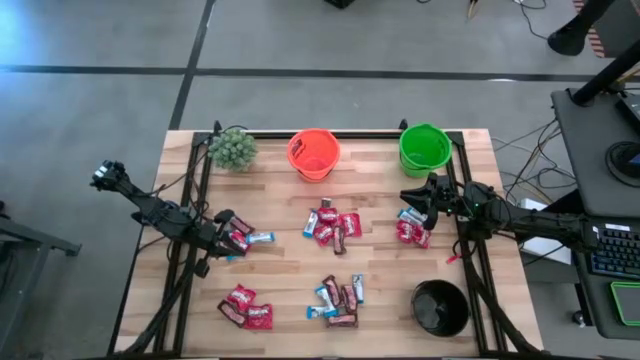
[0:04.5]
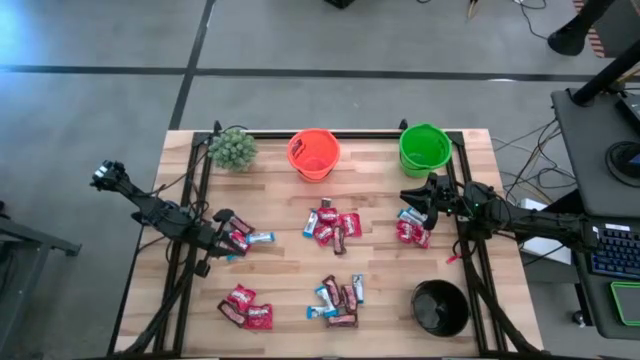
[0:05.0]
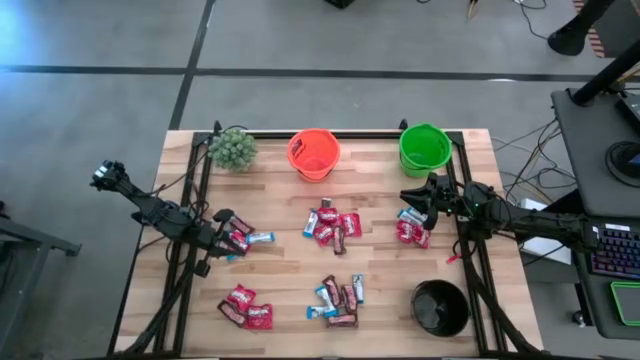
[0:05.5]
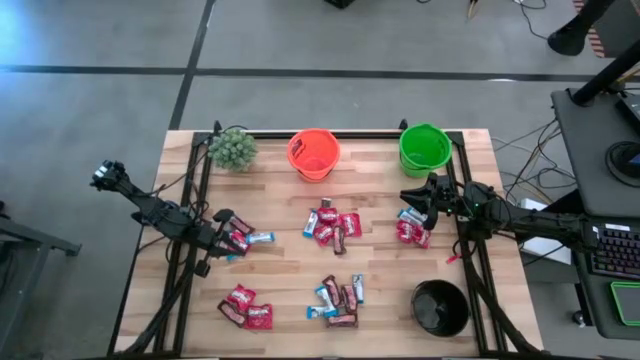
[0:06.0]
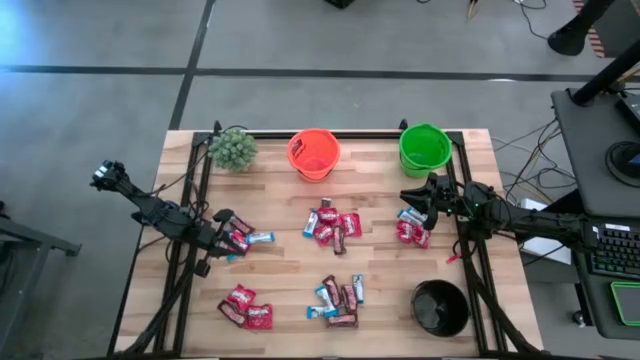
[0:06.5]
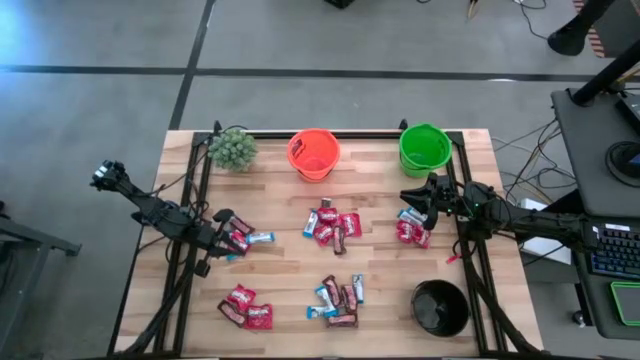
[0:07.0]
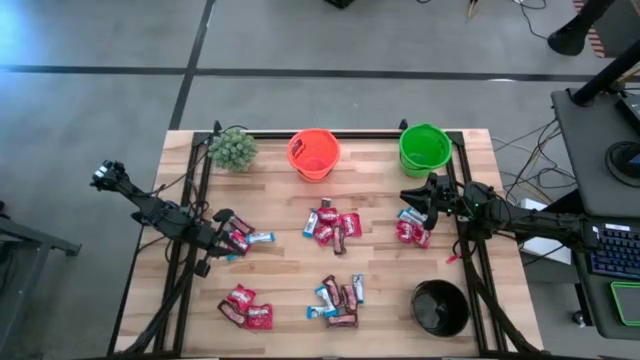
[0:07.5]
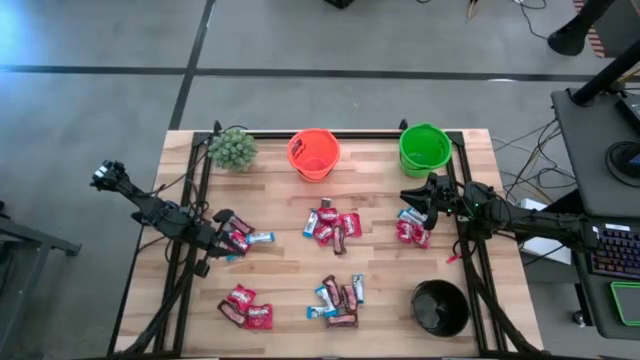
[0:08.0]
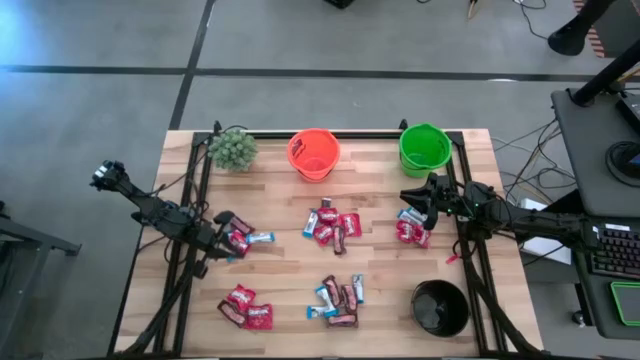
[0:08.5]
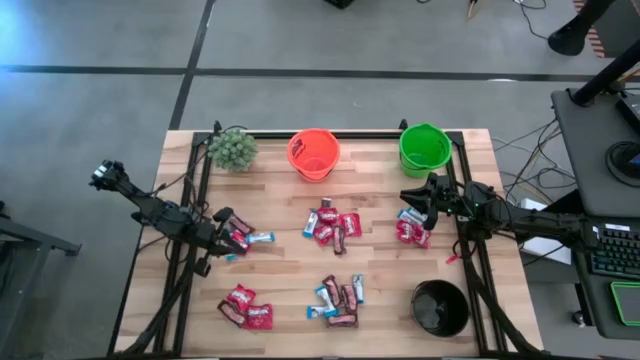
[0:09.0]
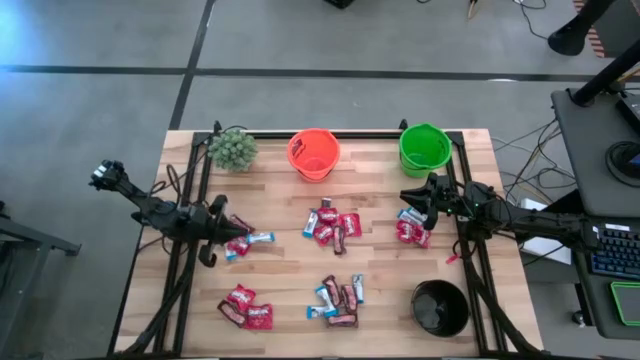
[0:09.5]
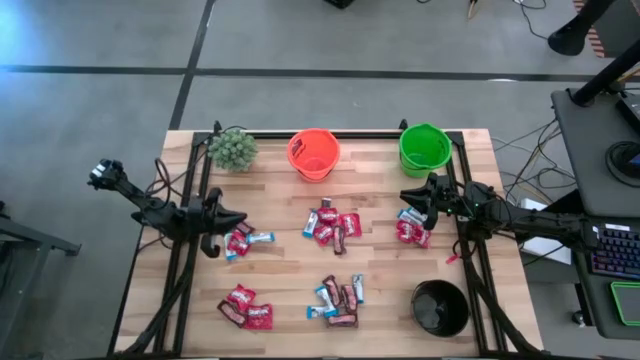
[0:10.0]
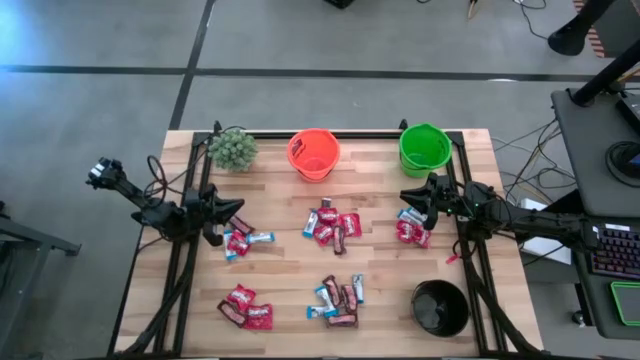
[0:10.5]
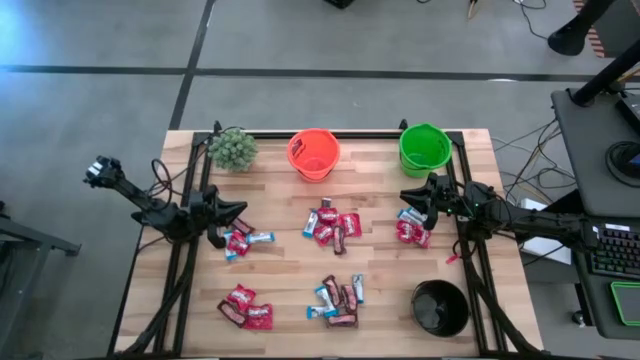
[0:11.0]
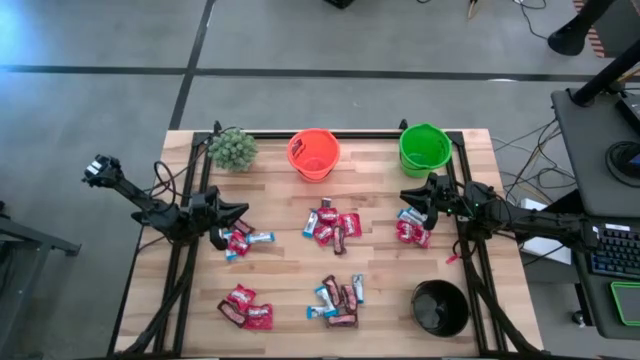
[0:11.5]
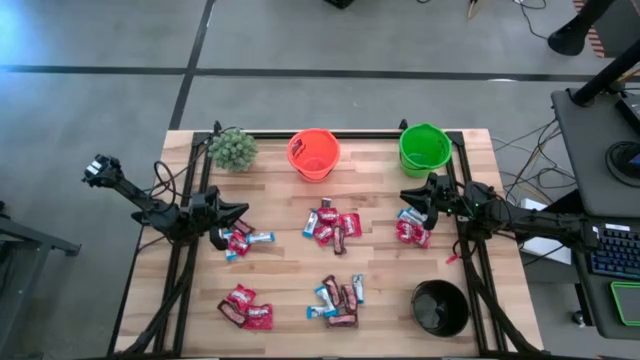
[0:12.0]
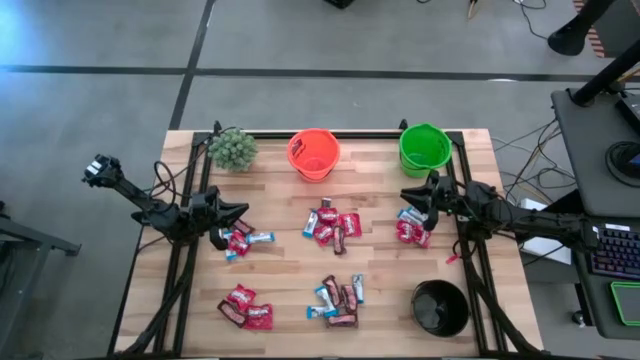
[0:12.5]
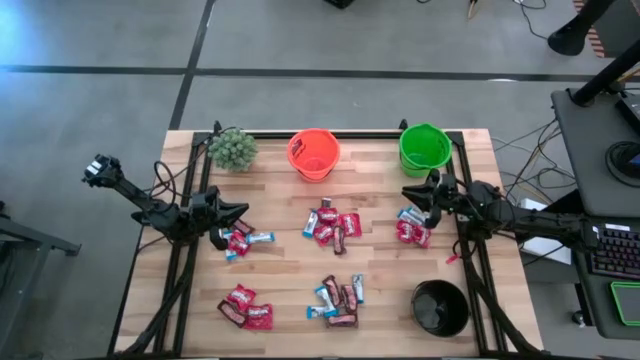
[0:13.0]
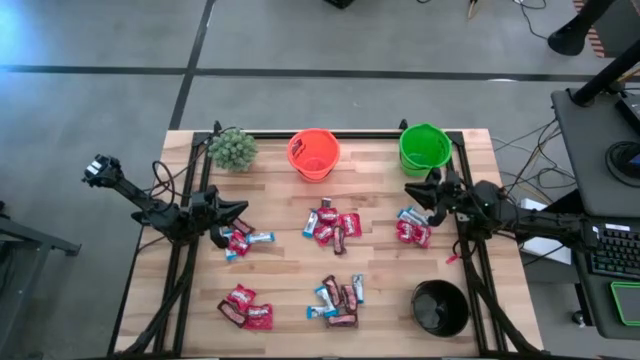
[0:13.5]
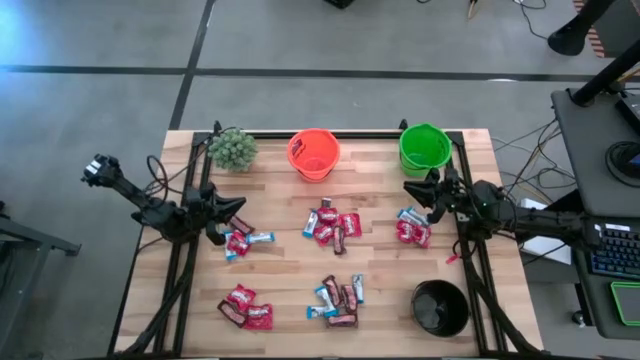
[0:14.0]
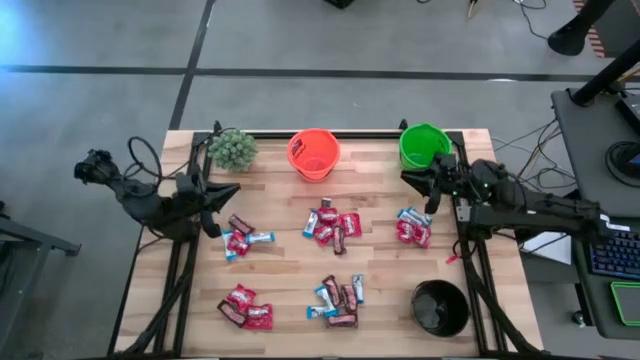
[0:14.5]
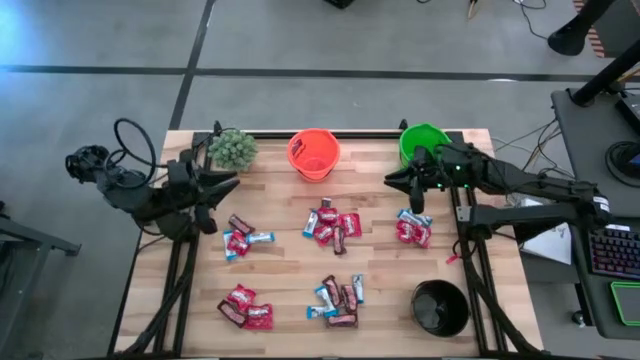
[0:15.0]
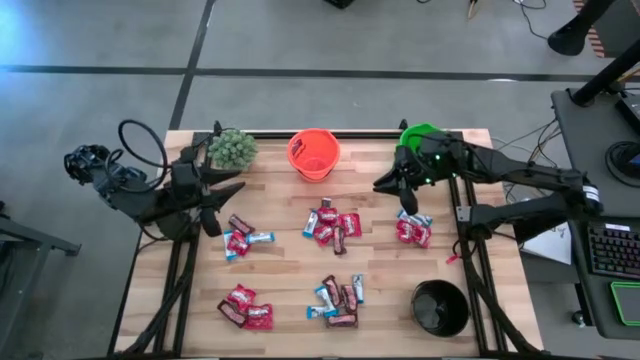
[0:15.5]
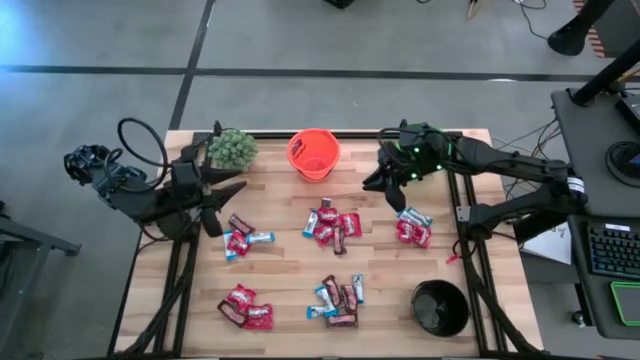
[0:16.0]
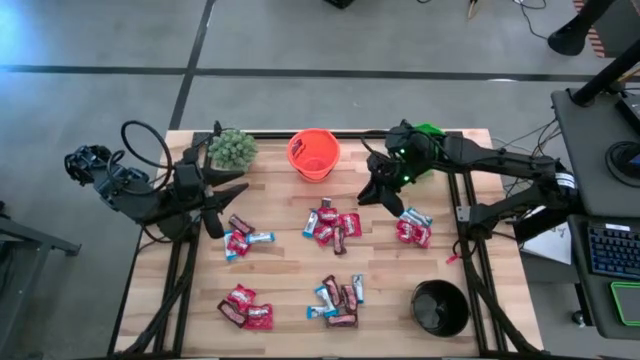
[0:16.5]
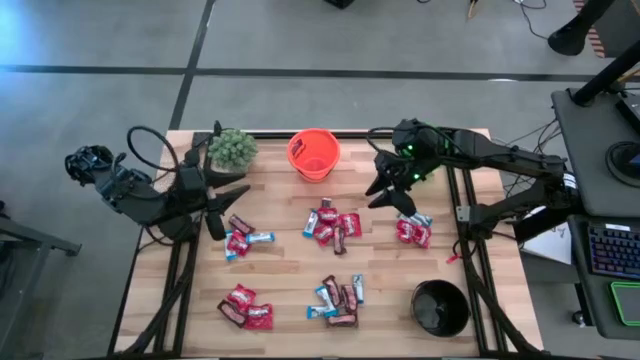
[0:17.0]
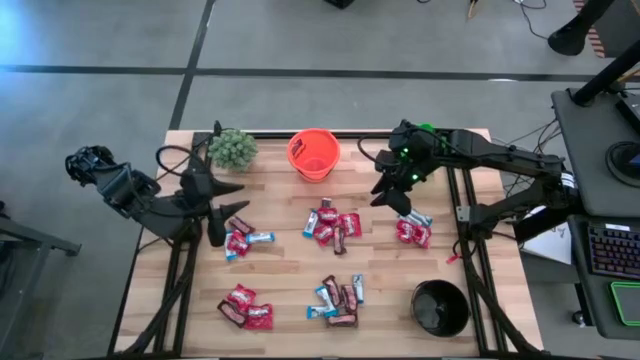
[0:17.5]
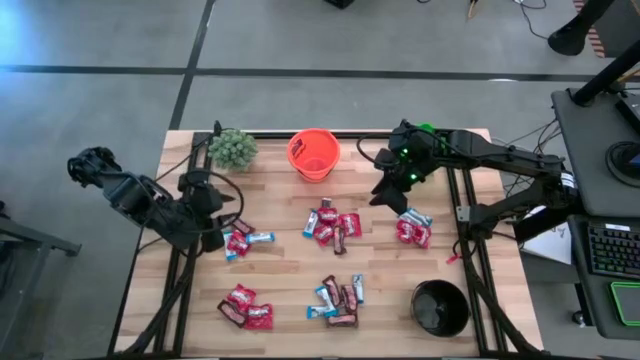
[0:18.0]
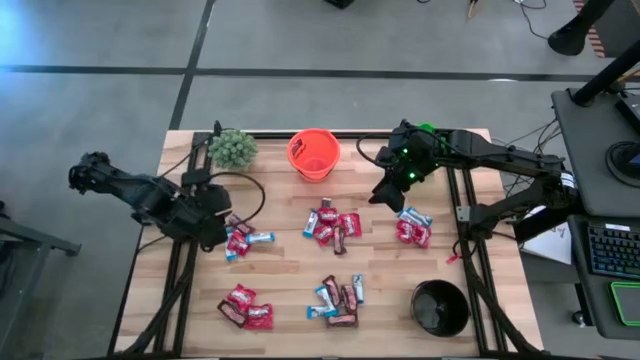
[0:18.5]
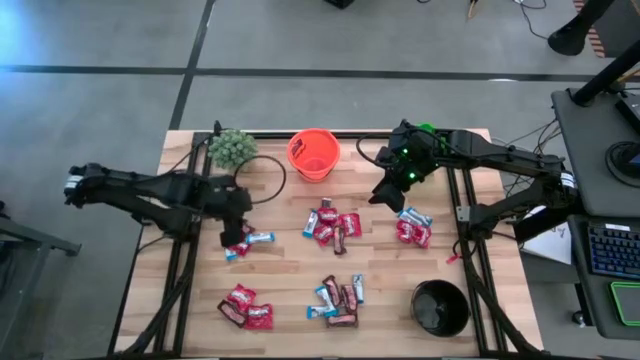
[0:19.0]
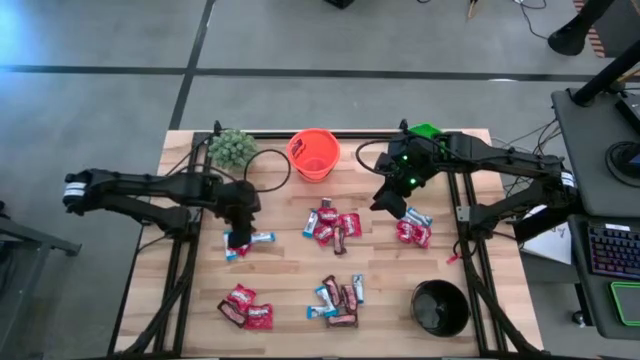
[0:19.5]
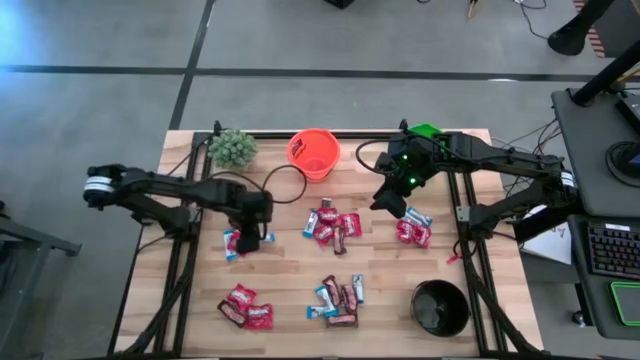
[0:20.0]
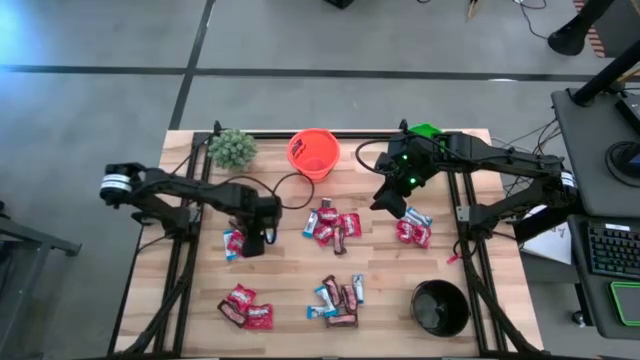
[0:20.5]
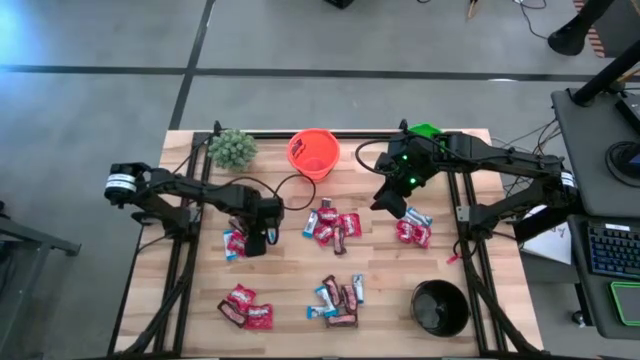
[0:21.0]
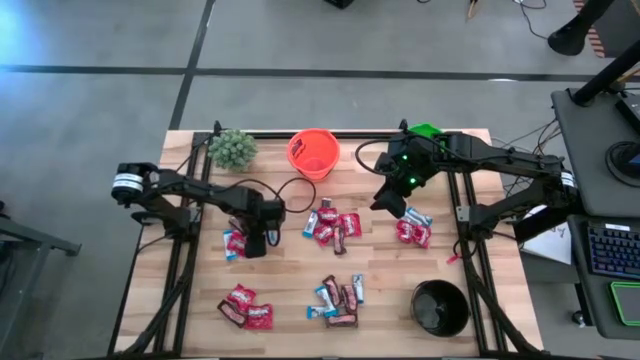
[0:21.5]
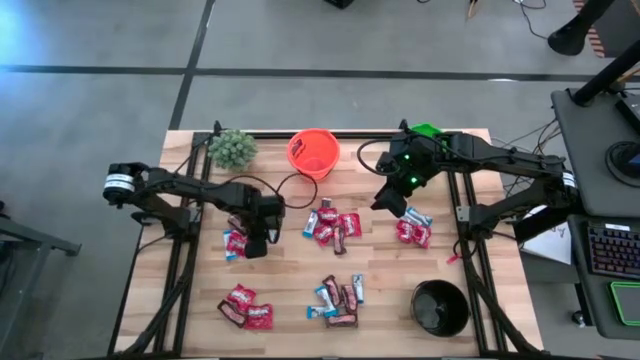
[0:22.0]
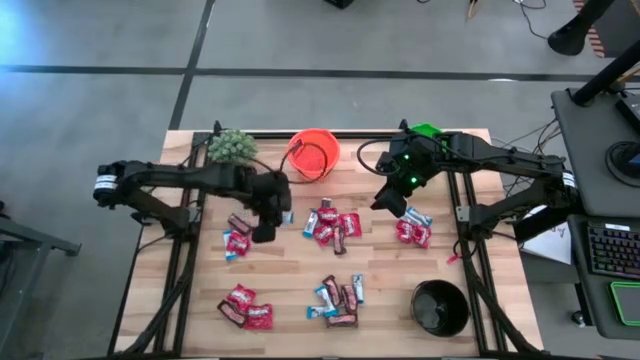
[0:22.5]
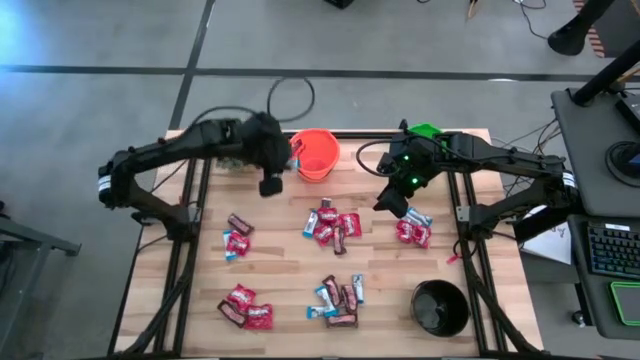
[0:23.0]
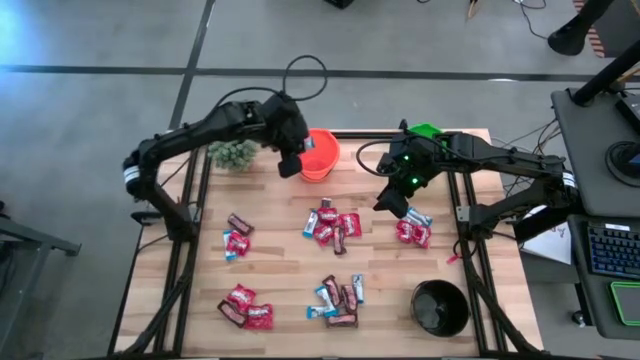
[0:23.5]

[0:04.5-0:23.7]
Task: Sort candy
Put the white chocolate into the orange bucket
